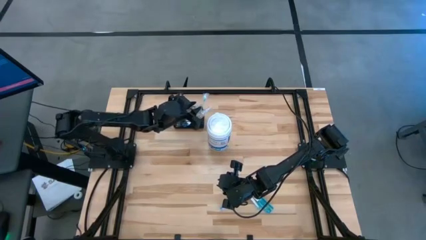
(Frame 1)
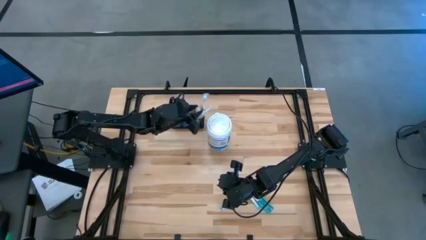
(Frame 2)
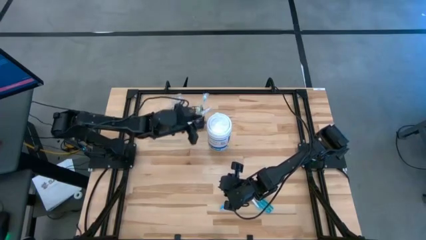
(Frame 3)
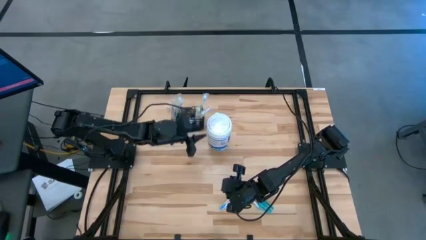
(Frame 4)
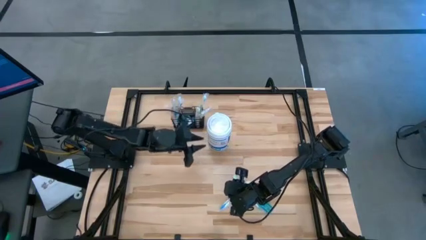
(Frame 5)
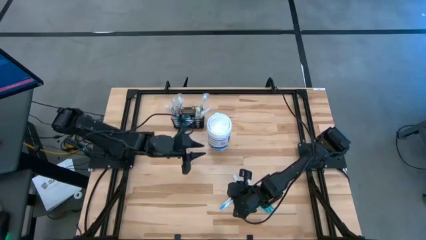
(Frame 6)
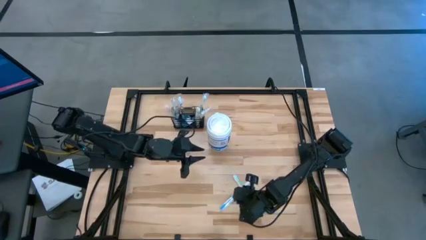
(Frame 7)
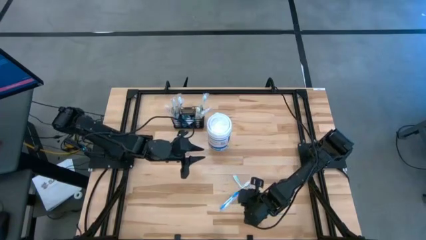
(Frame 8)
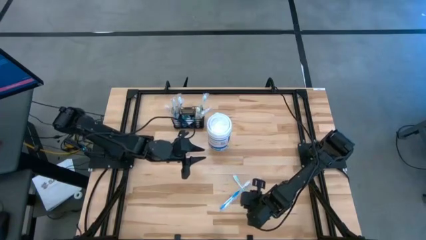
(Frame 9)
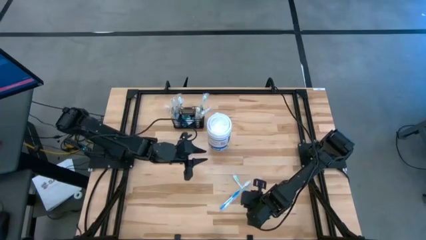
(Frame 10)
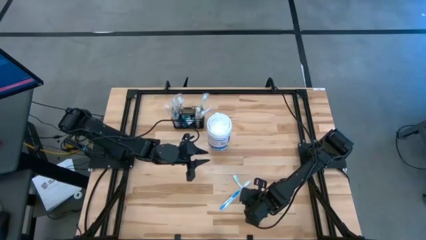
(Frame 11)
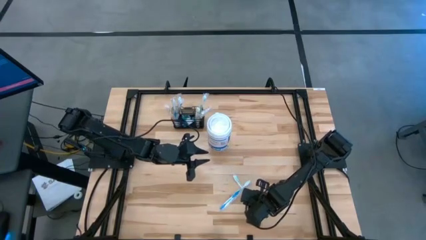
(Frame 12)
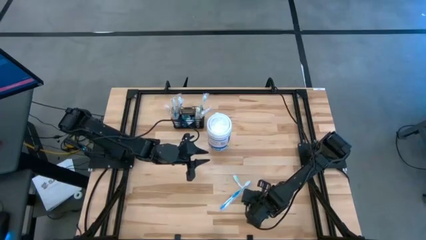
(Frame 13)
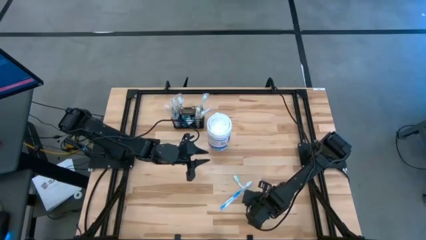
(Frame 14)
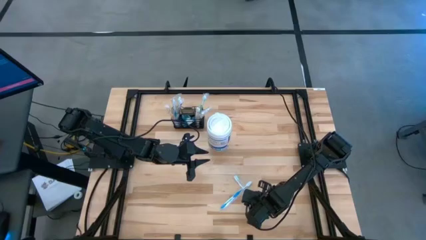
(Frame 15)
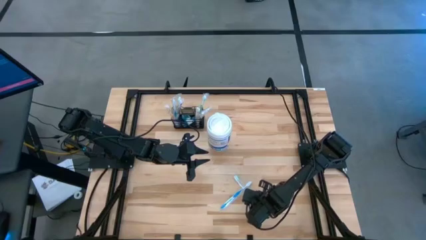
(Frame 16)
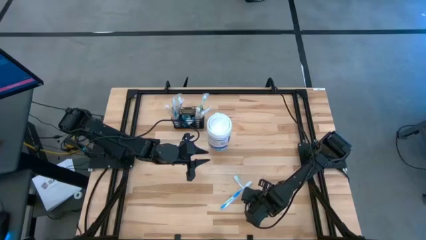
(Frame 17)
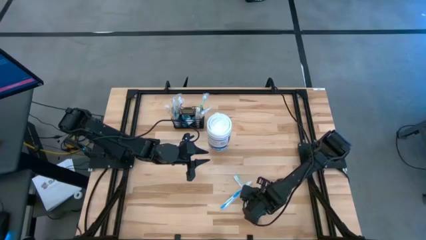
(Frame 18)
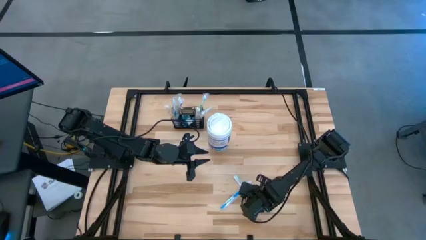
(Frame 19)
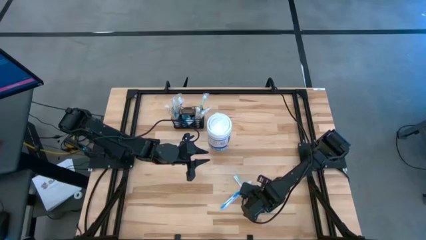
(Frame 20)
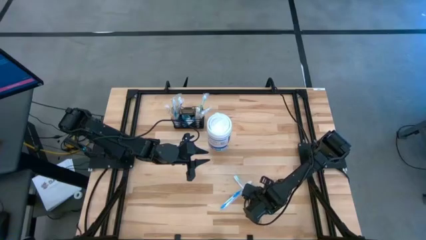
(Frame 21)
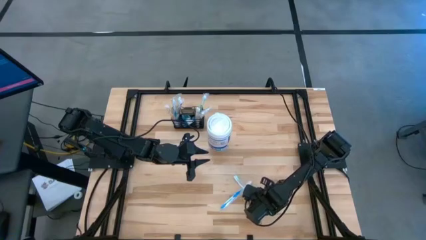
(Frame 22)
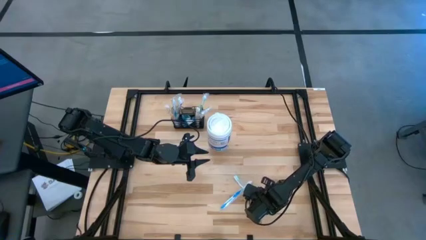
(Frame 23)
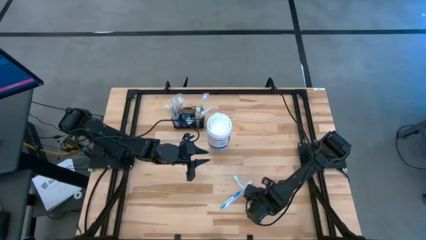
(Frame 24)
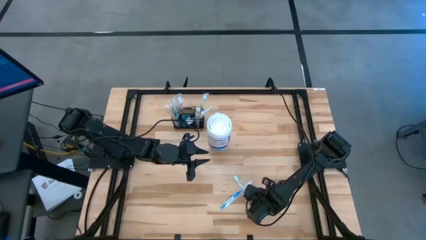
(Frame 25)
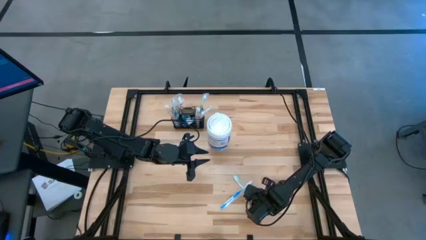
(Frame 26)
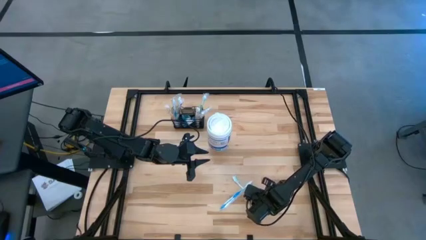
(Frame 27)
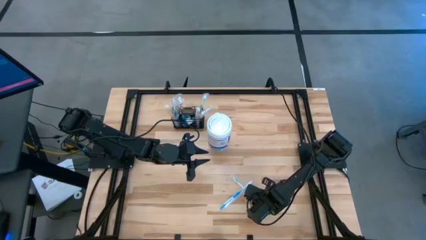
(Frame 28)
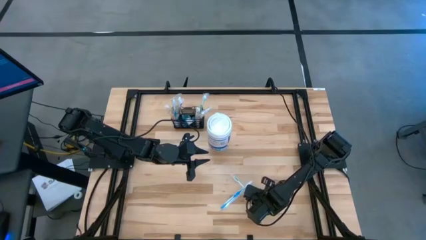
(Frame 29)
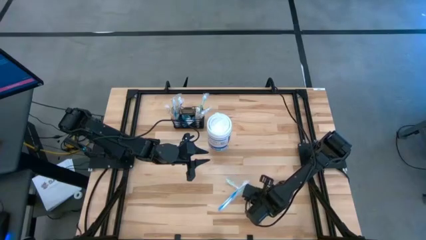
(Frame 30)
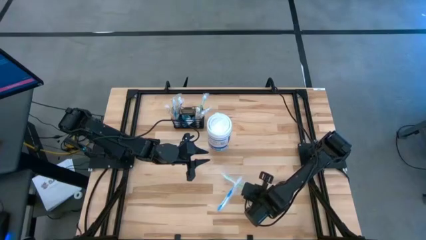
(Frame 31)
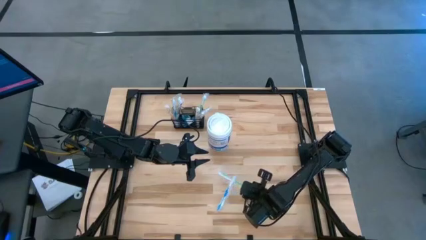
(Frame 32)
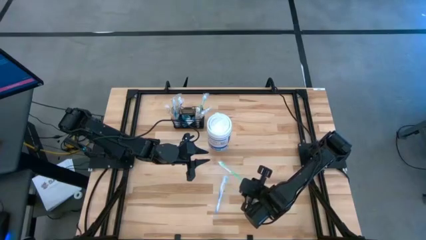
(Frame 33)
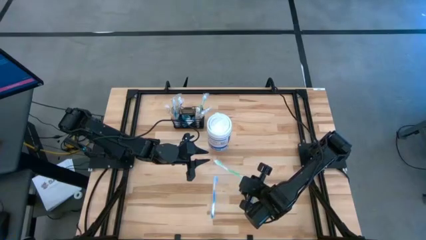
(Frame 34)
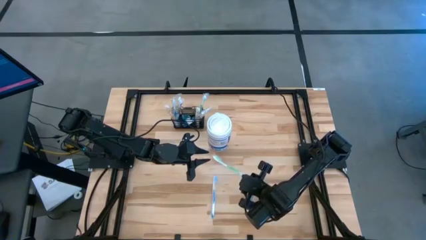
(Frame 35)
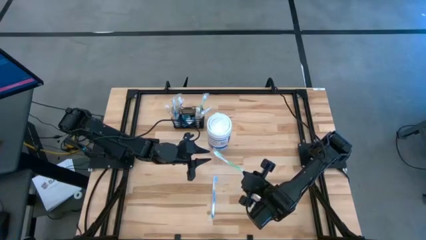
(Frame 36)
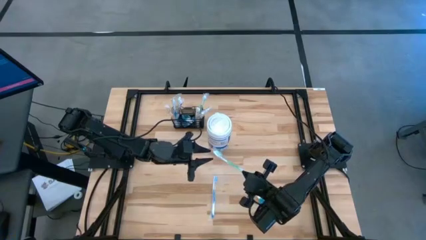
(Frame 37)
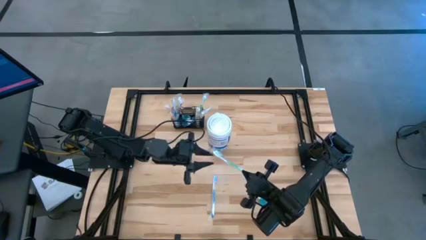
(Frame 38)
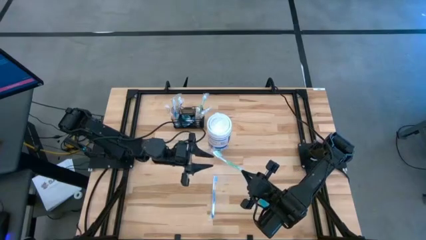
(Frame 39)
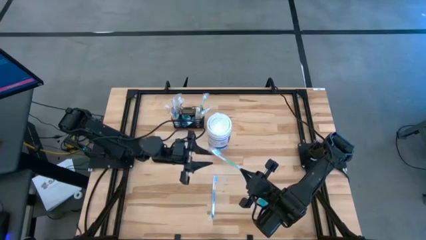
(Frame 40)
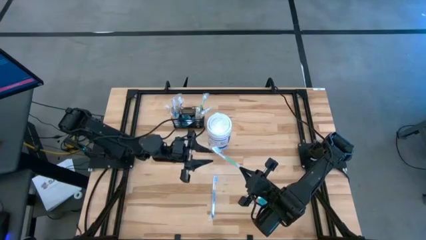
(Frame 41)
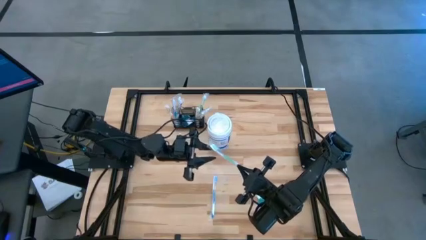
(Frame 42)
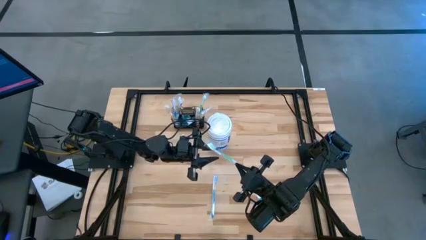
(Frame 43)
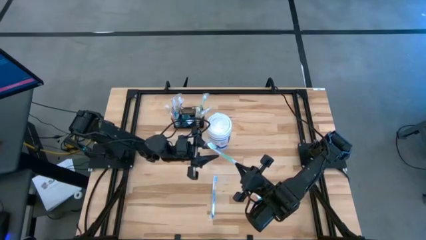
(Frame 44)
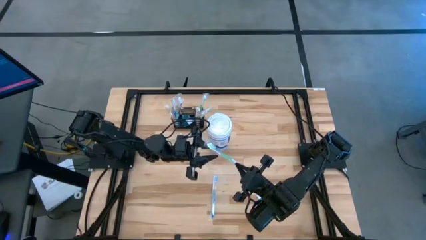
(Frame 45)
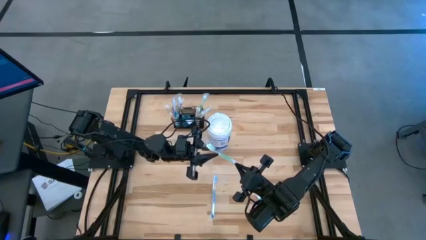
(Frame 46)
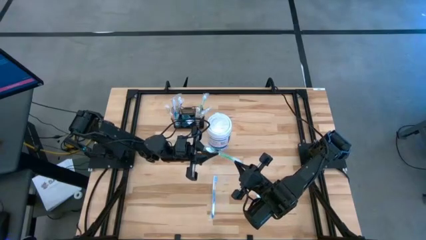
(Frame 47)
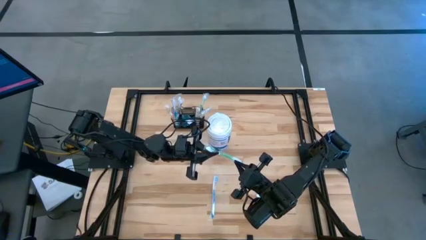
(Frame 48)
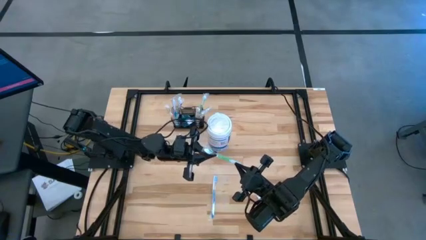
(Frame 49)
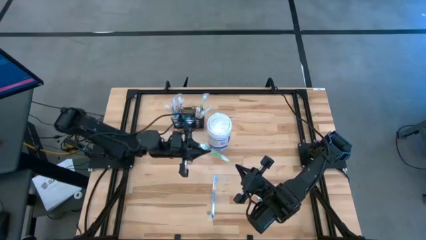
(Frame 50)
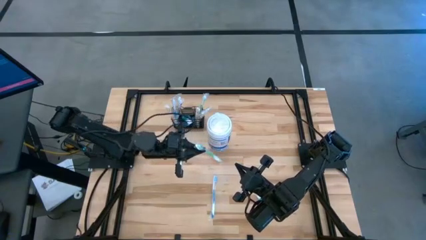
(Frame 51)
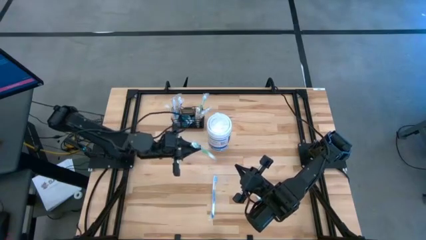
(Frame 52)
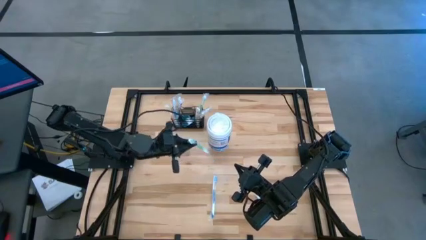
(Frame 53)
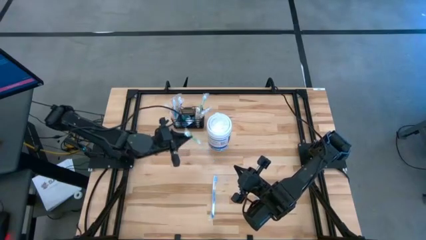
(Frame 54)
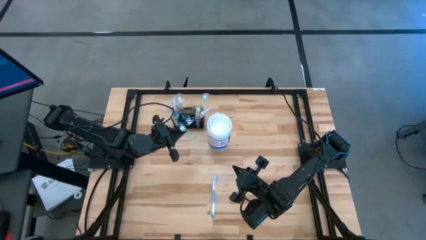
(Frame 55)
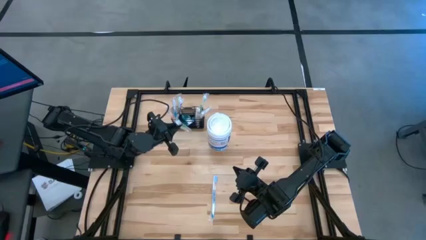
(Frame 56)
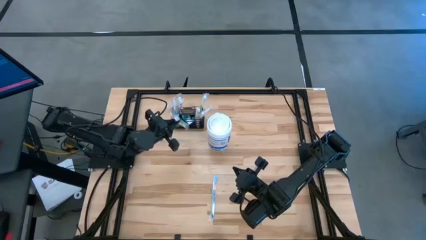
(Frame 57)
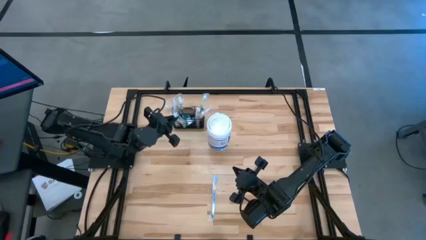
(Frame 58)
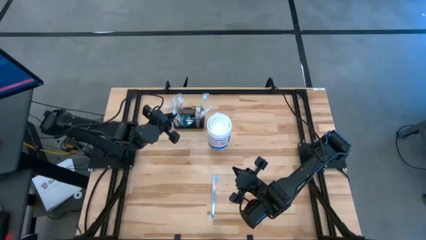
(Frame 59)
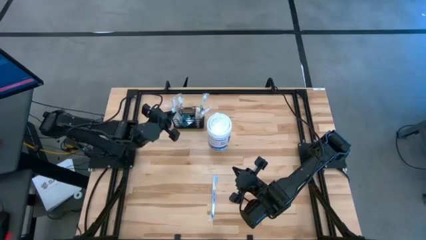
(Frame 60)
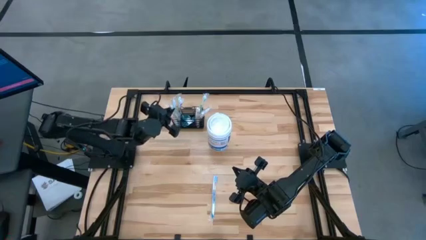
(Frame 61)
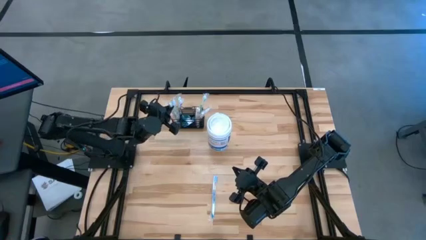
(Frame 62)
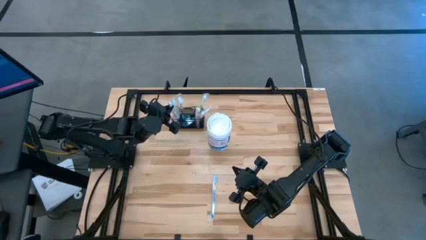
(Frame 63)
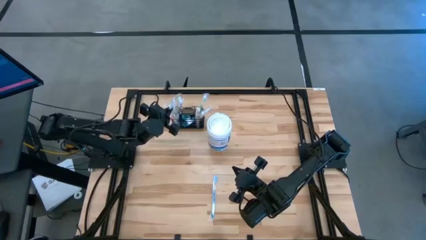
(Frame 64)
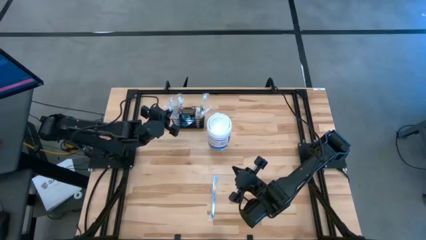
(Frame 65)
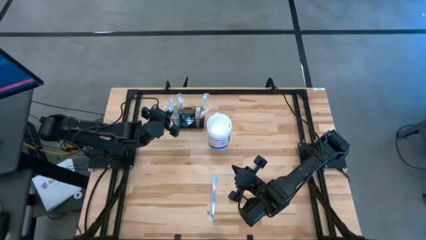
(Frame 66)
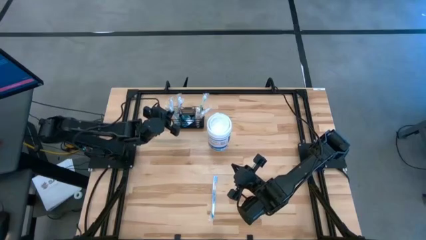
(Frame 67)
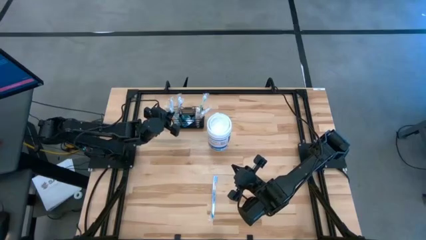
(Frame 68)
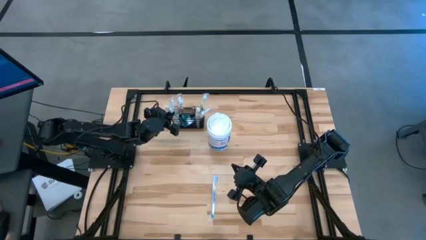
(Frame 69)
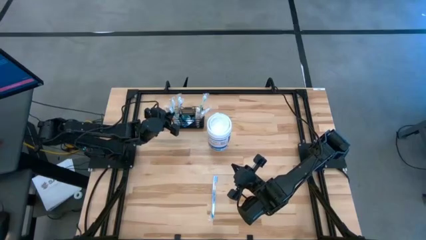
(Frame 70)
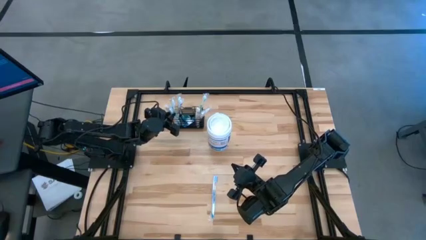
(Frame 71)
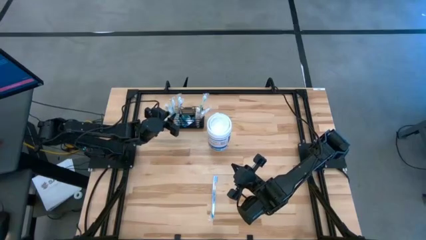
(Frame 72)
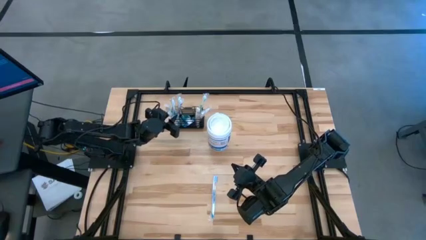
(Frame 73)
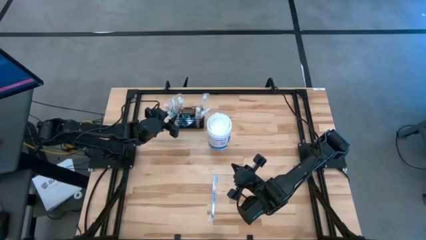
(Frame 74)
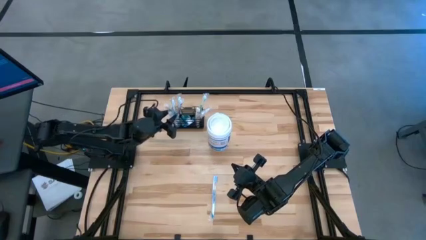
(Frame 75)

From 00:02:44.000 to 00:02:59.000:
Task: Pick & Place toothbrushing station
Put the green toothbrush into the mesh organizer

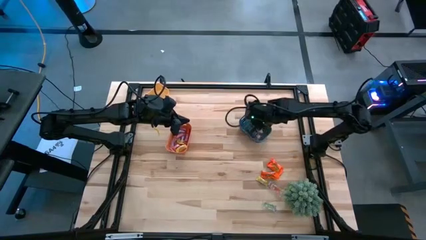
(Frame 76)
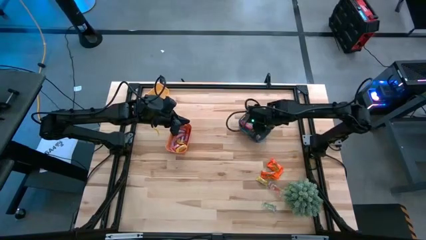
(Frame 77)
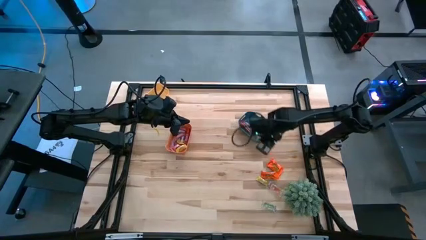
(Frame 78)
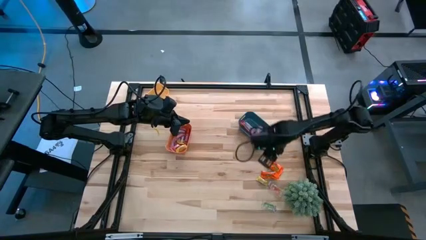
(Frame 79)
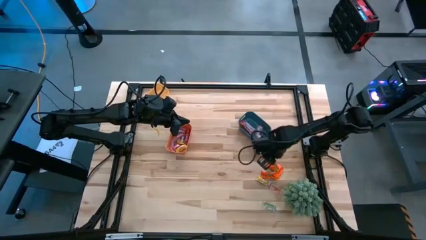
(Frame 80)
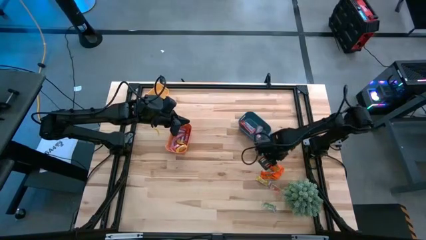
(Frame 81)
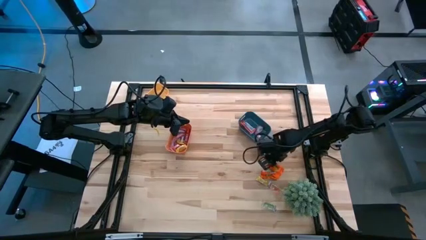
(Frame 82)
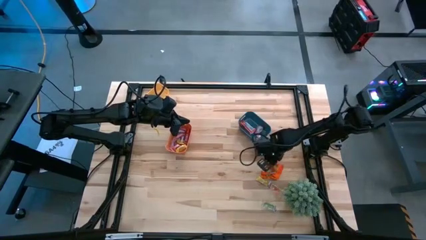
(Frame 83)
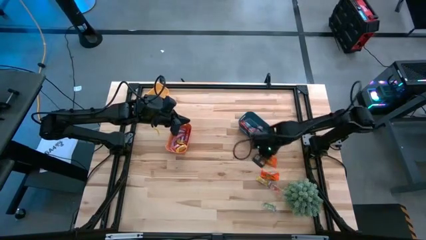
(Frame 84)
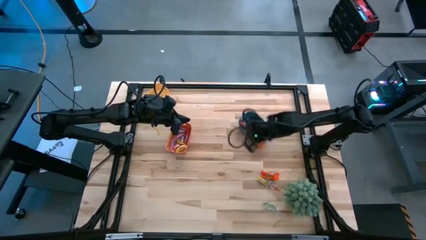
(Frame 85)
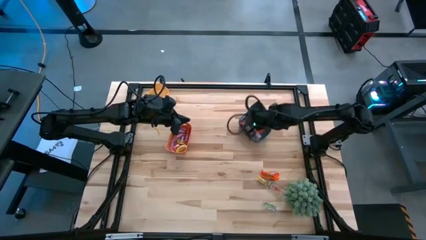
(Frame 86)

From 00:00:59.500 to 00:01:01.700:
Task: Sort candy
Put the top orange chocolate into the blue bin

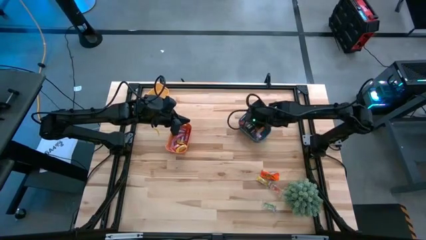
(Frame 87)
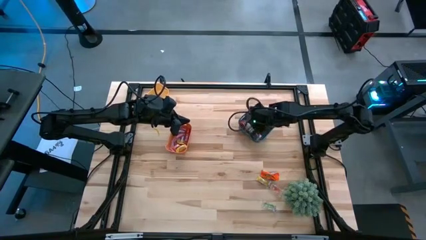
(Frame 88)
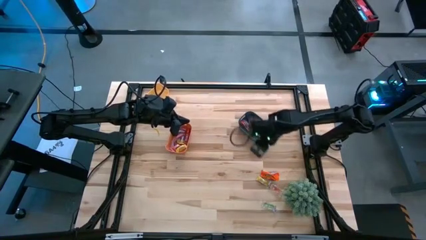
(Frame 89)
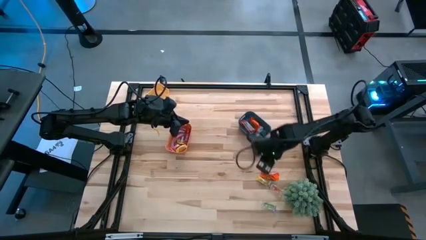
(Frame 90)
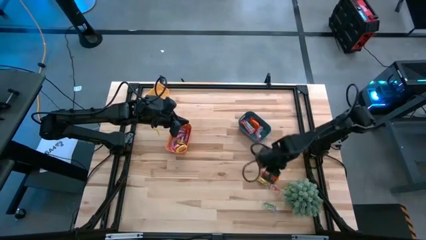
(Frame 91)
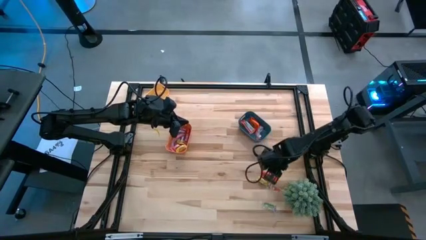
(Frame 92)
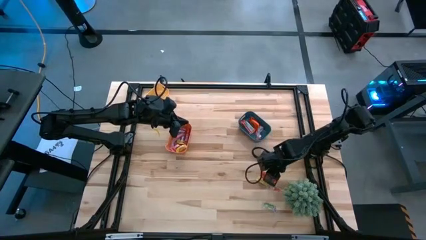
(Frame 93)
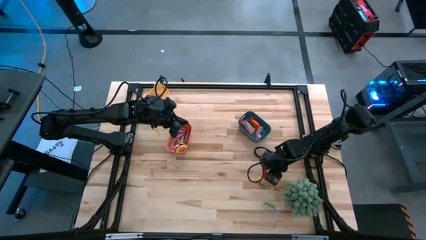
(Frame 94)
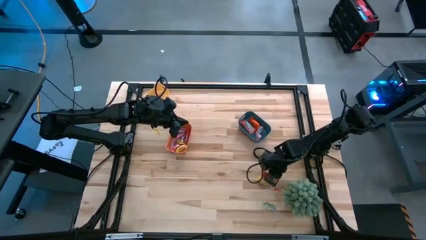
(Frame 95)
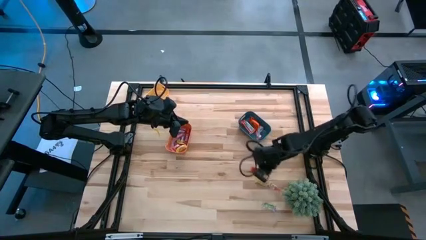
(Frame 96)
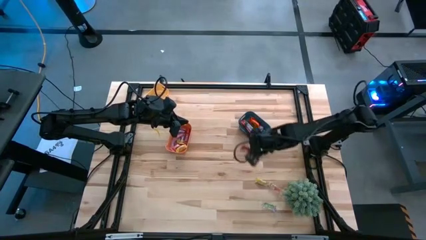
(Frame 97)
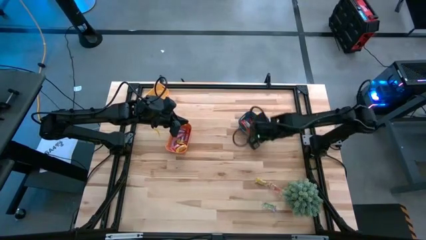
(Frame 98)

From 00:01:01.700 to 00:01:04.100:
Put the orange chocolate into the blue bin
